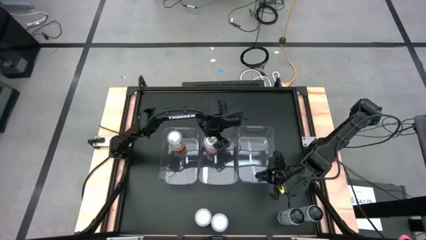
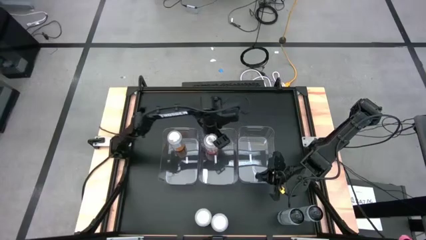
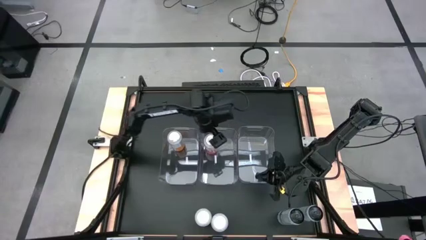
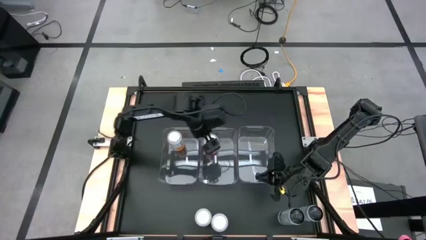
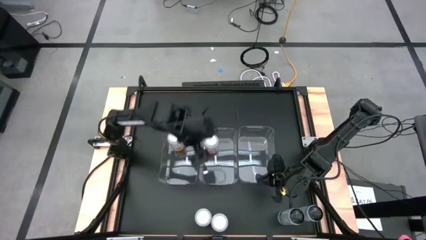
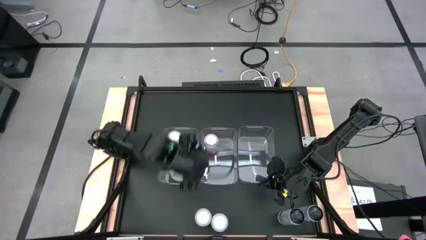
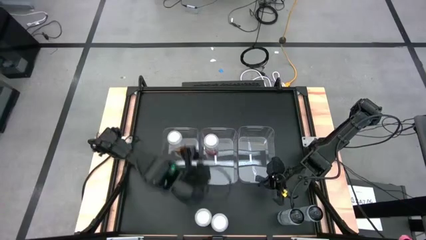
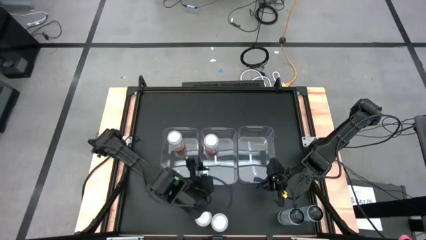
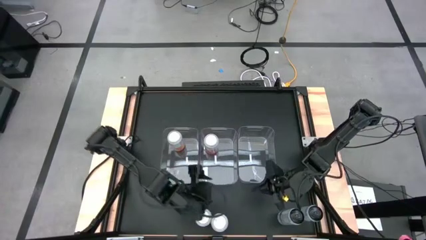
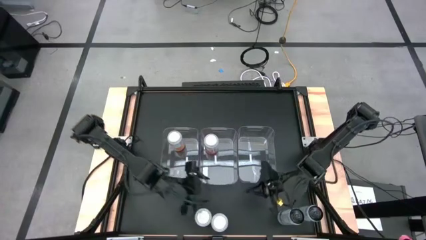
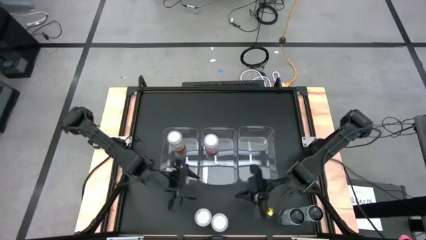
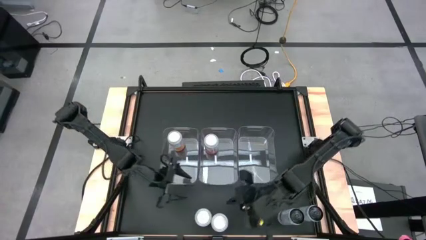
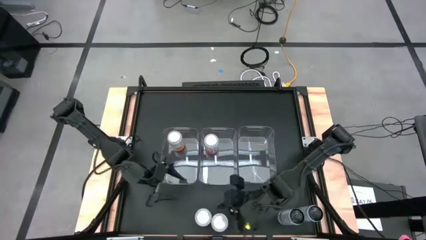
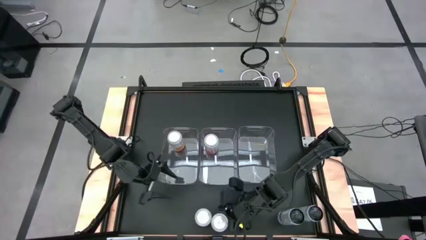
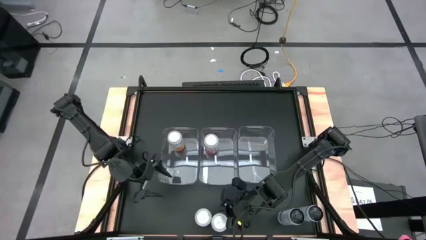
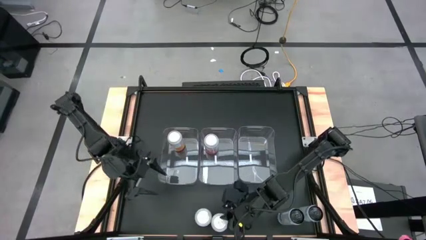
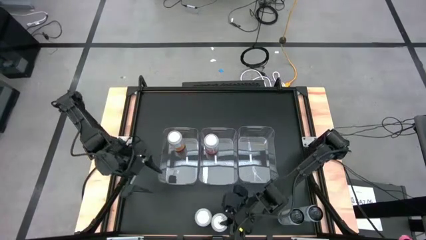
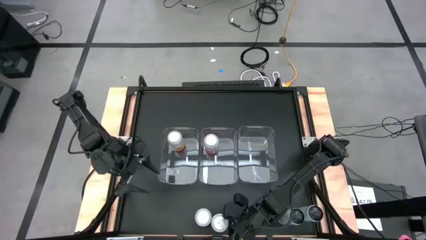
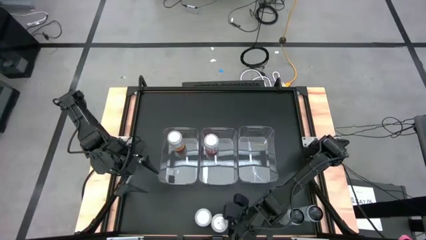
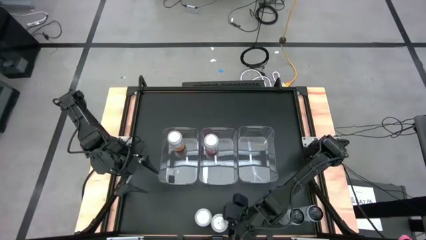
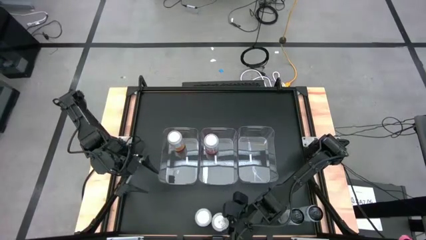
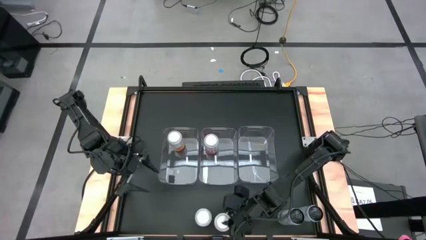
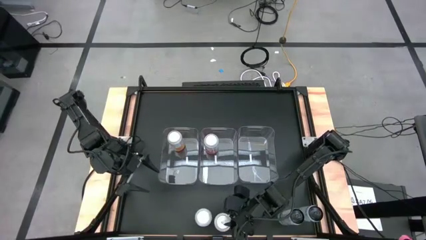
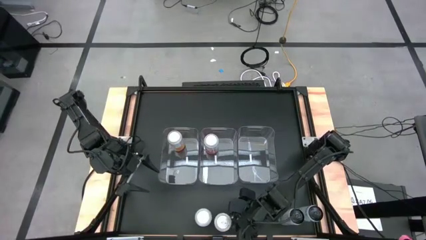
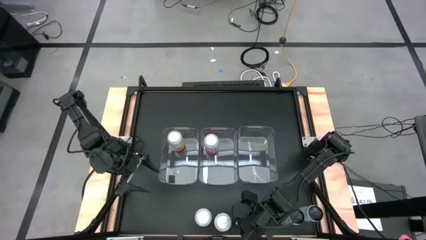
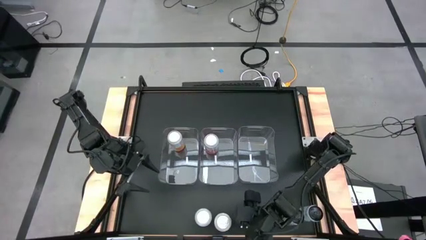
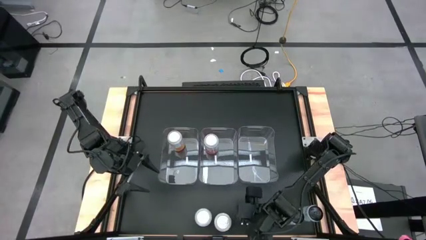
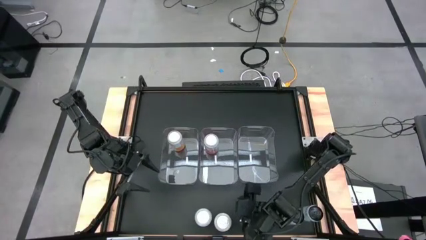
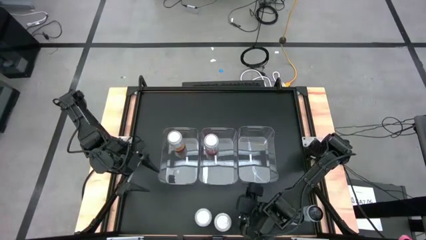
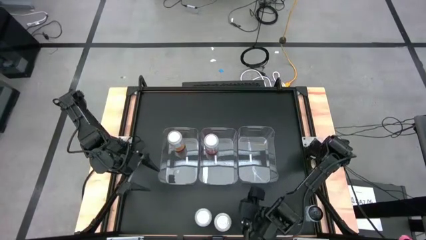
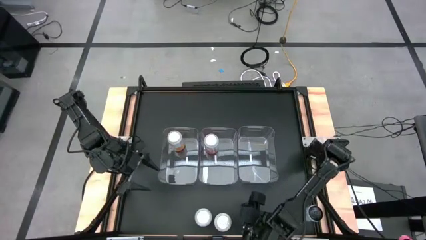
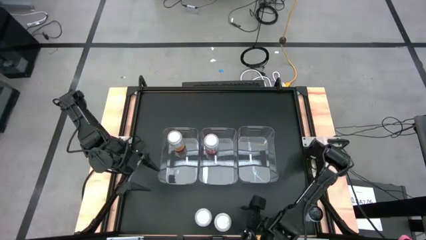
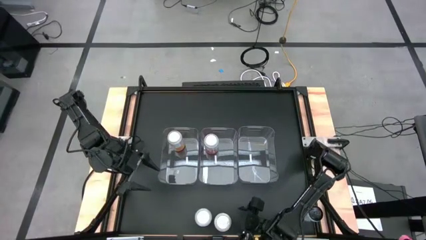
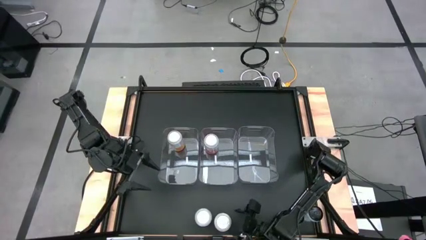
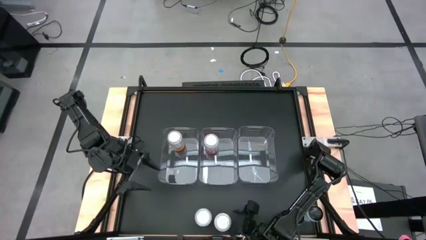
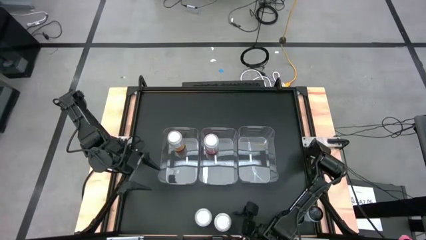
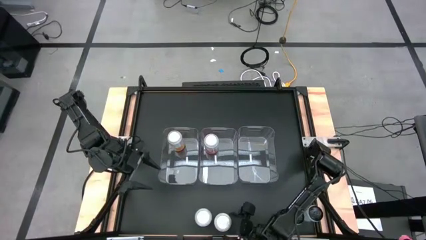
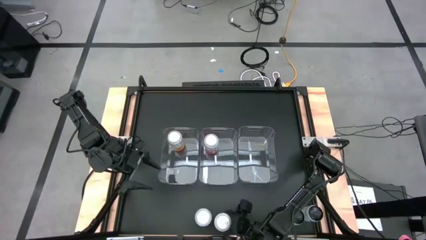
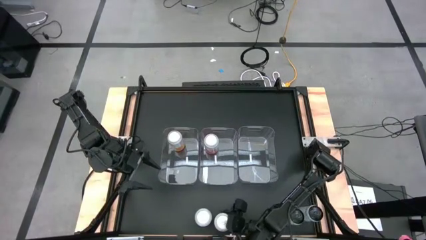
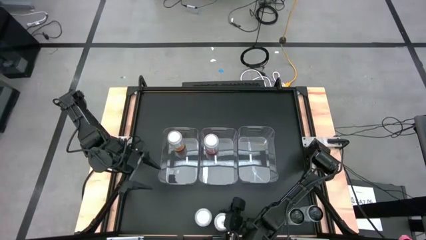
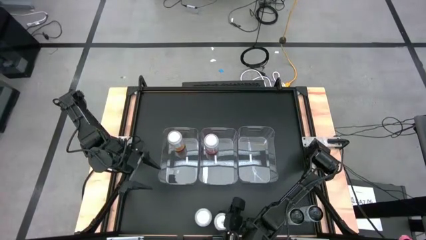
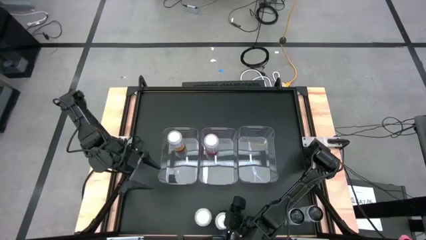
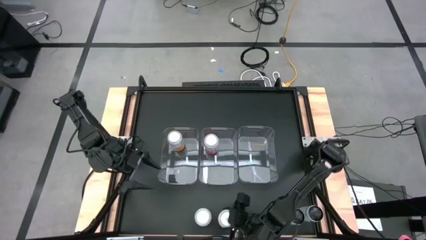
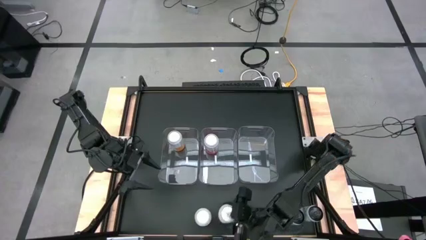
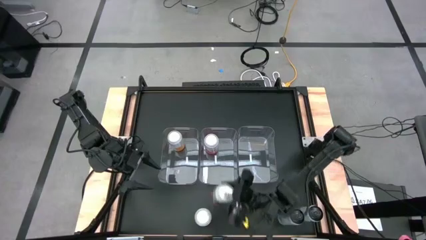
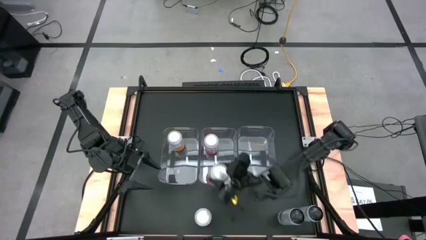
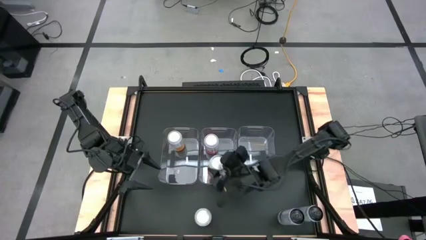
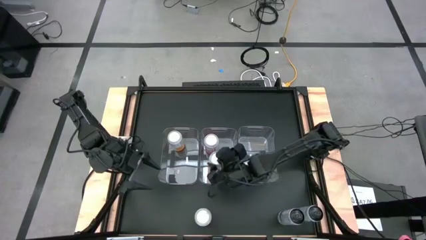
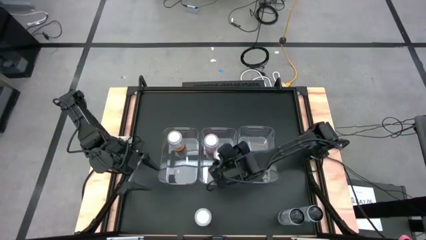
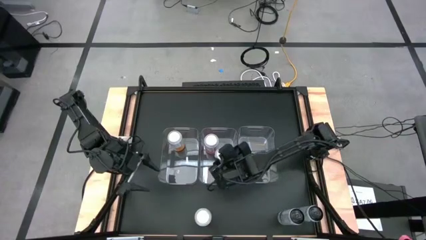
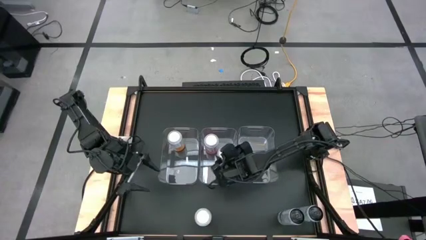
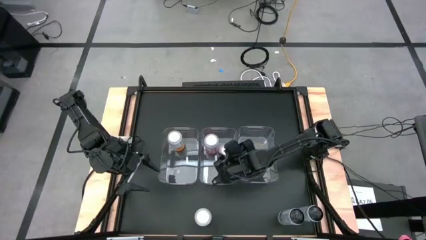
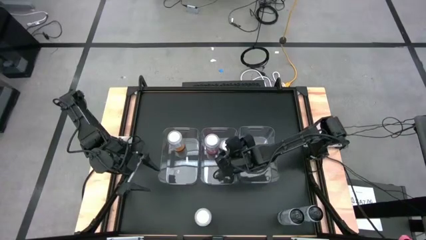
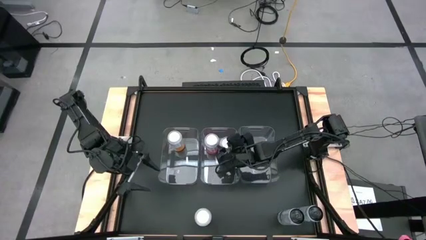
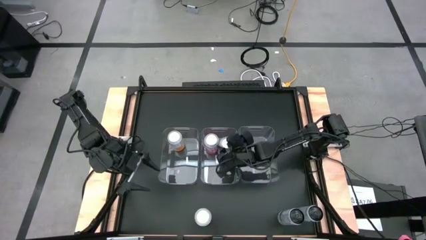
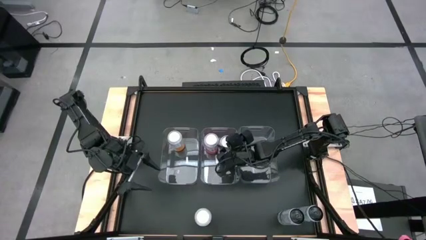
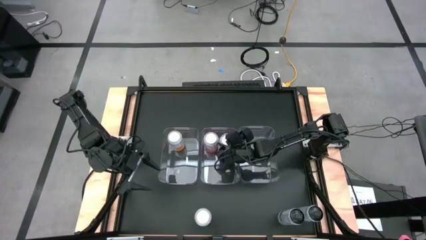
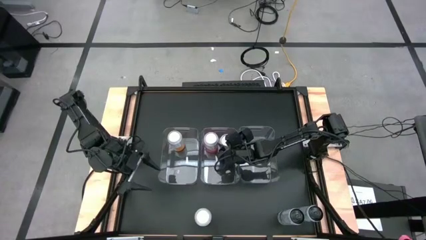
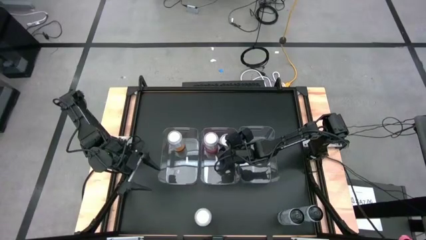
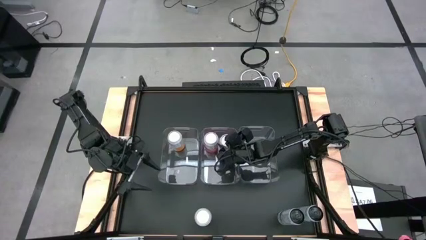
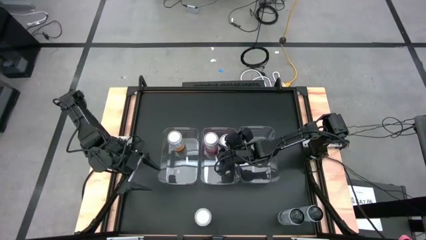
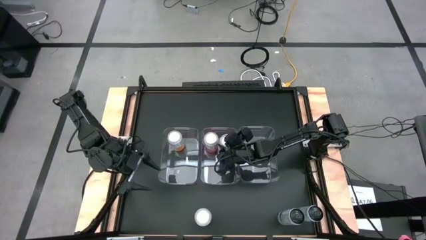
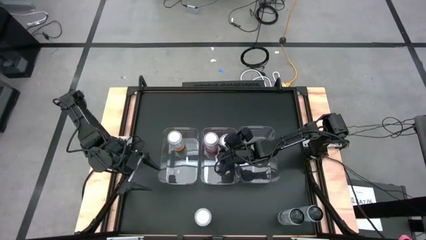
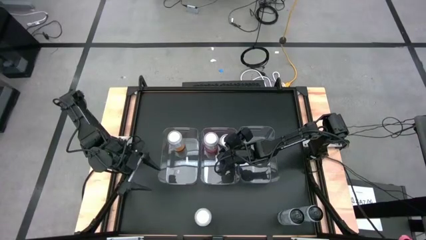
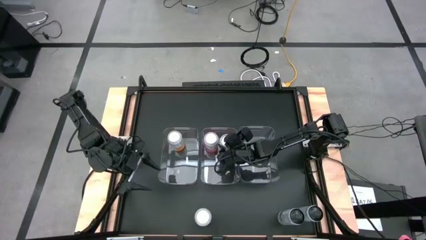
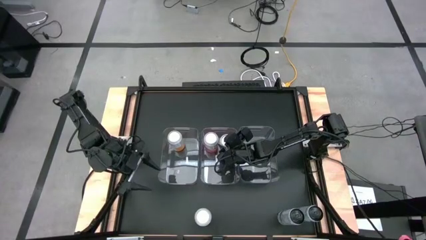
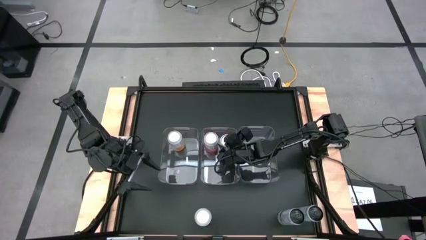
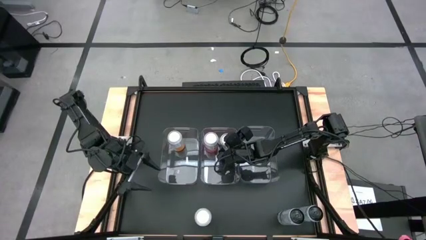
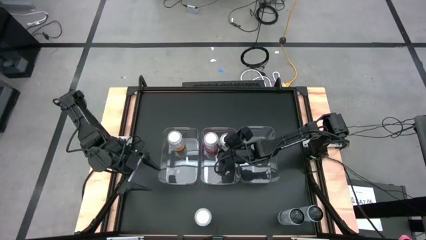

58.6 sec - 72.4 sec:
Task: Sort soda cans
Put the pink soda can into the center transparent bin
